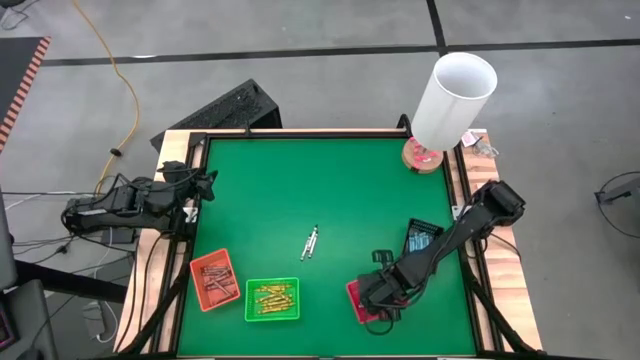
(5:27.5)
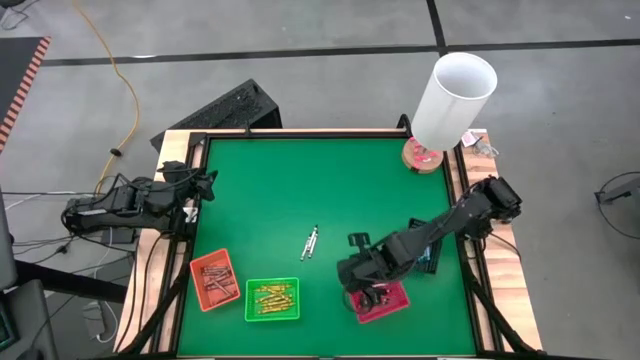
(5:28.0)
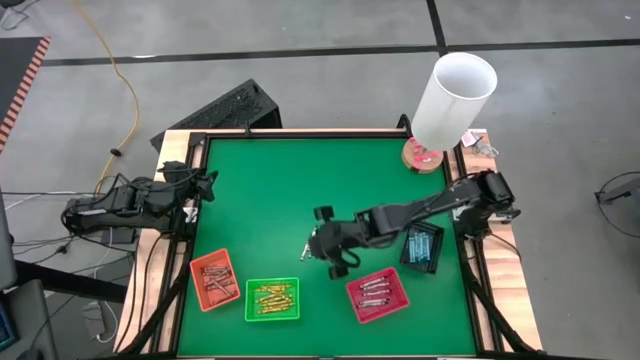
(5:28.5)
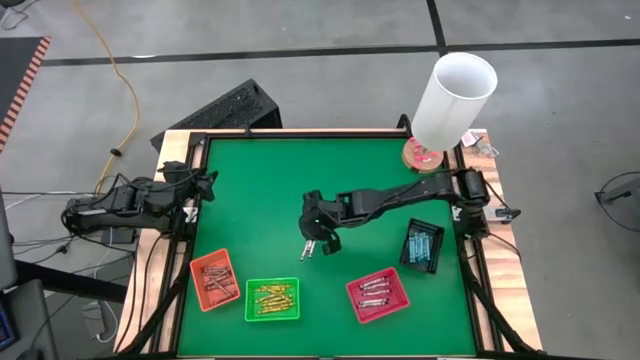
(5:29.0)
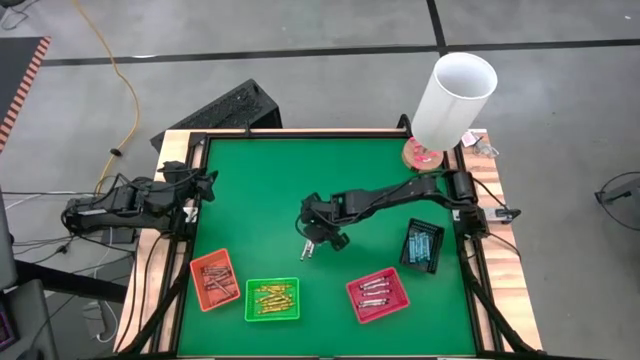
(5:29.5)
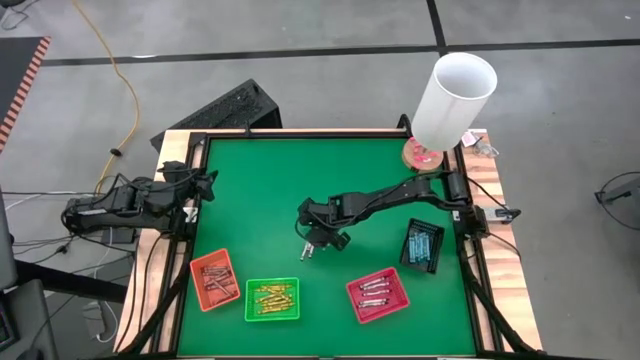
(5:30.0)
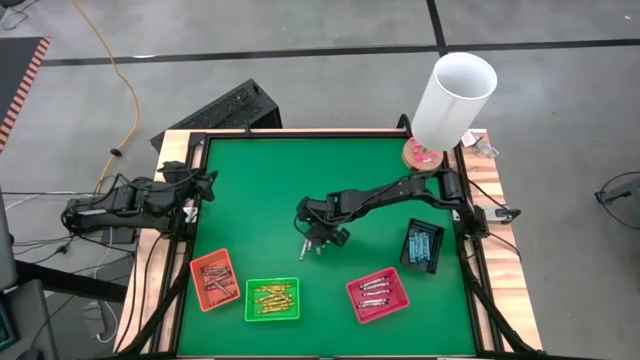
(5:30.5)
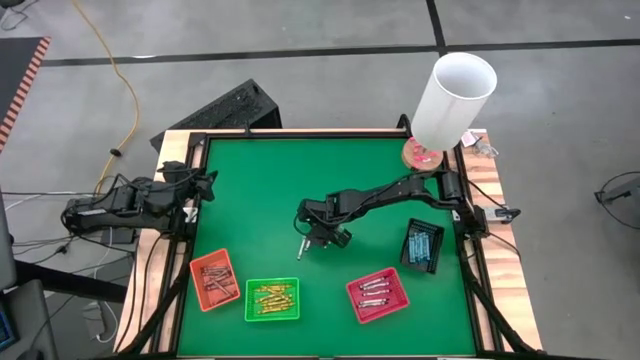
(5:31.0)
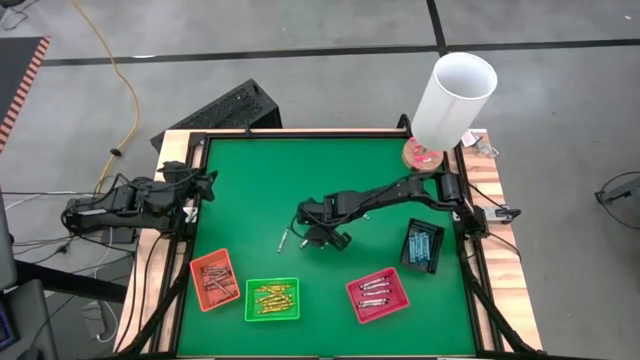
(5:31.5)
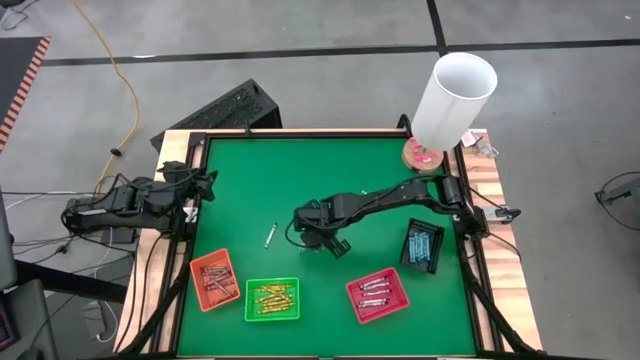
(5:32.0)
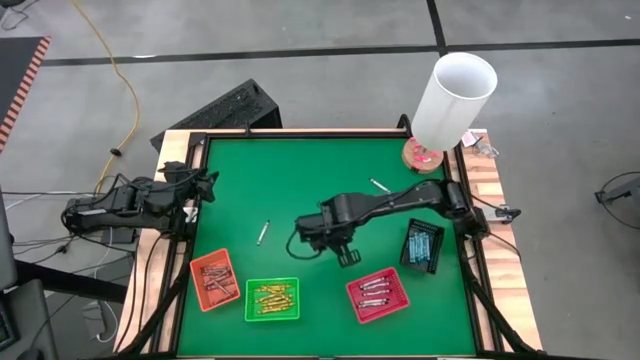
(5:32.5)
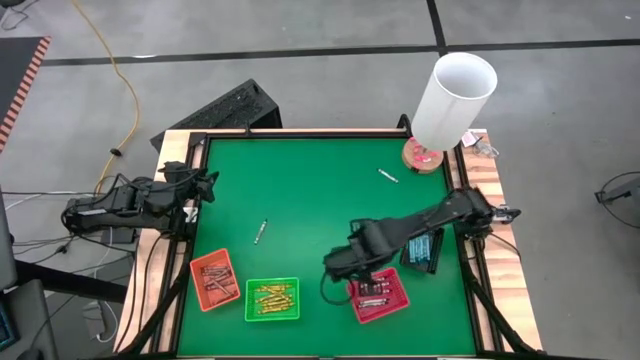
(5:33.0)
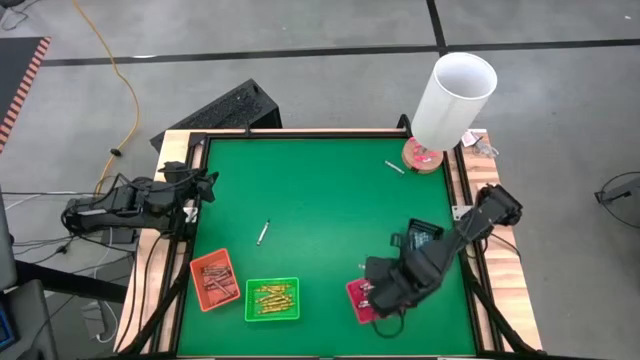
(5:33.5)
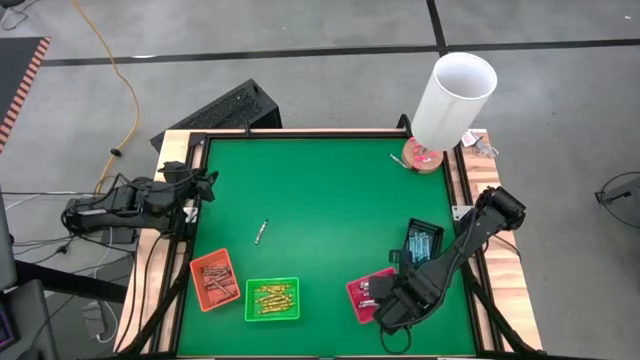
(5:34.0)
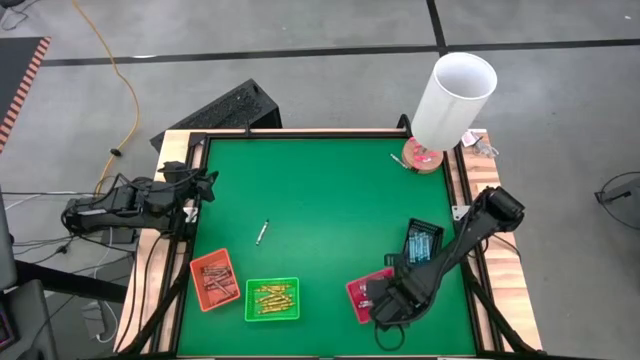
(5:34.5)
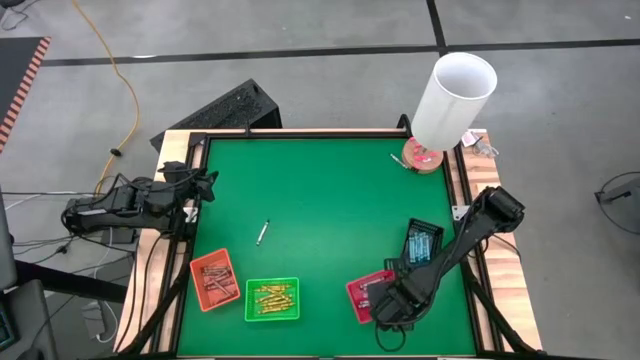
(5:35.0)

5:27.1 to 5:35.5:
Task: Sort crayons
Put the black crayon into the red bin

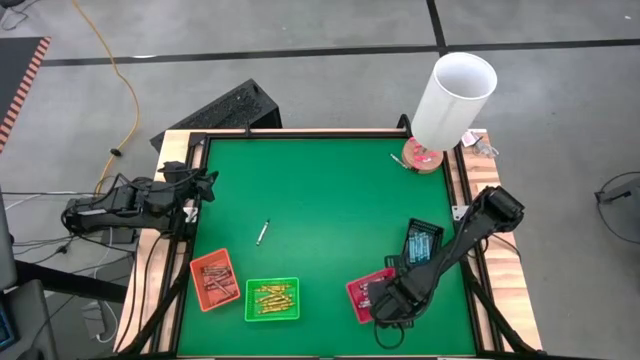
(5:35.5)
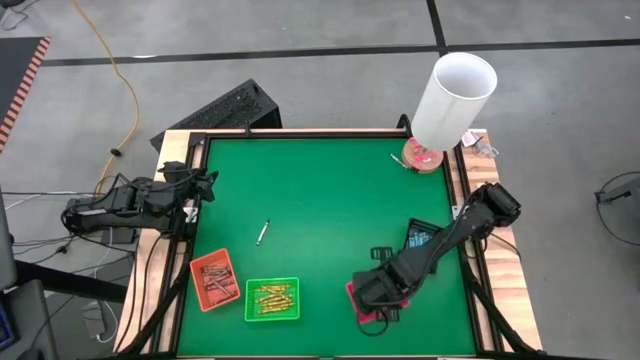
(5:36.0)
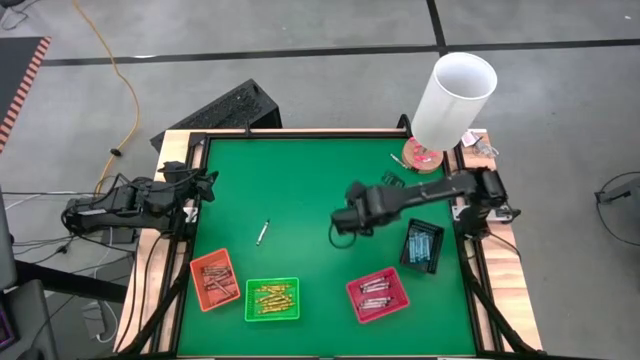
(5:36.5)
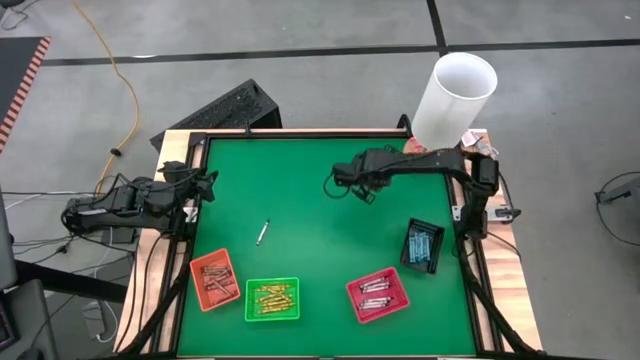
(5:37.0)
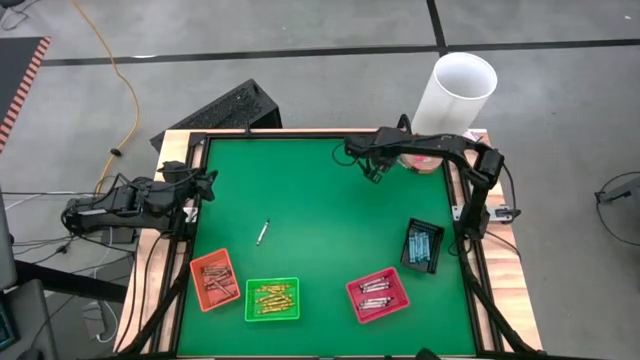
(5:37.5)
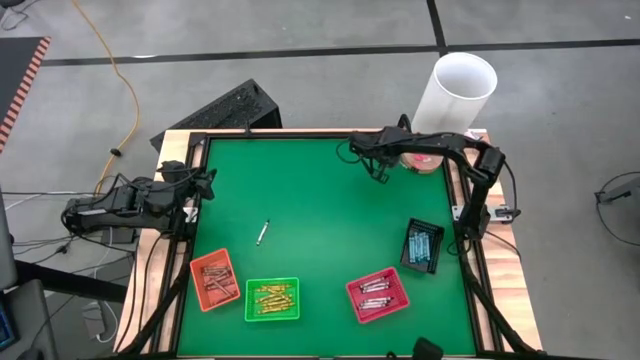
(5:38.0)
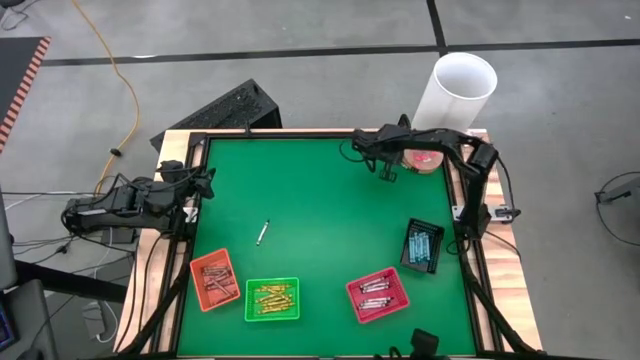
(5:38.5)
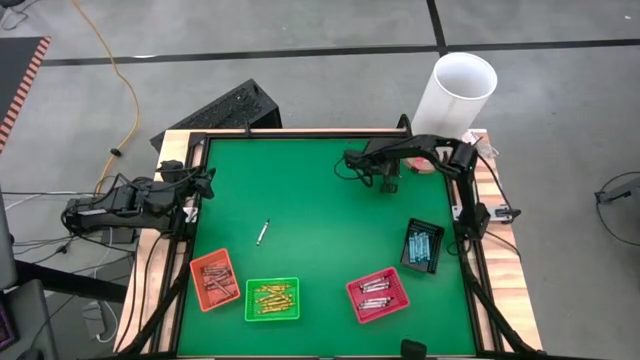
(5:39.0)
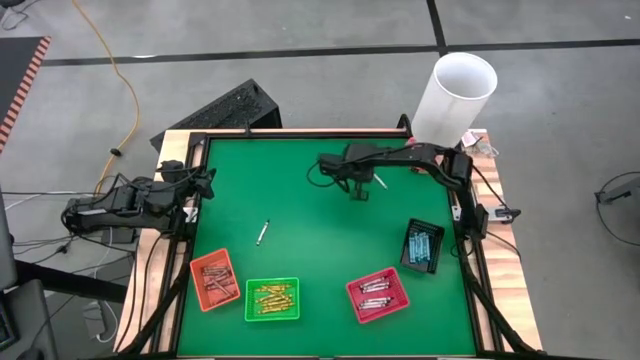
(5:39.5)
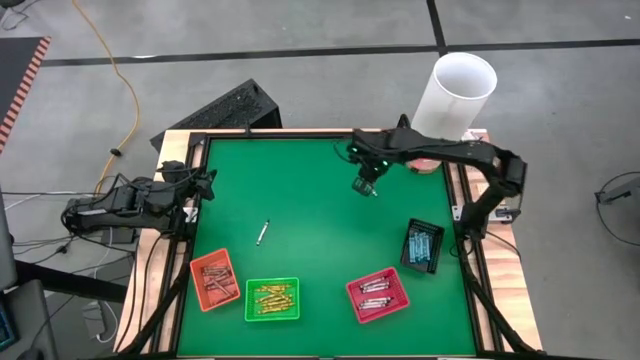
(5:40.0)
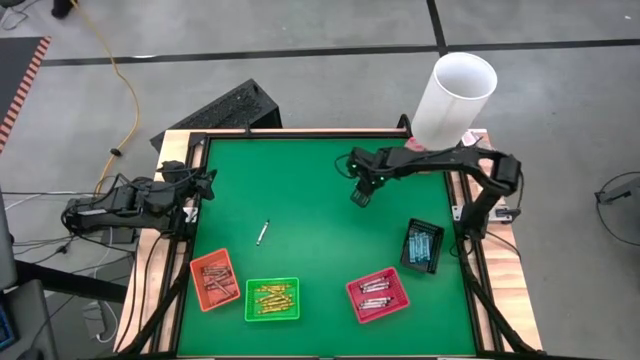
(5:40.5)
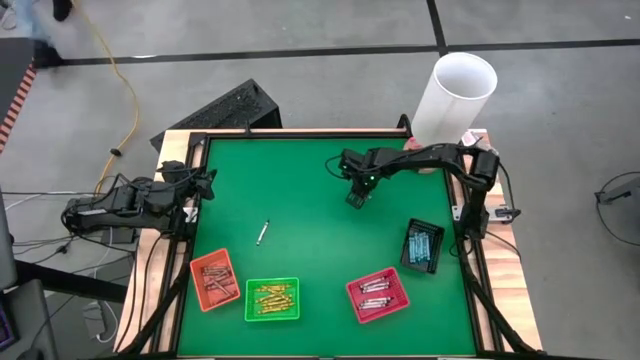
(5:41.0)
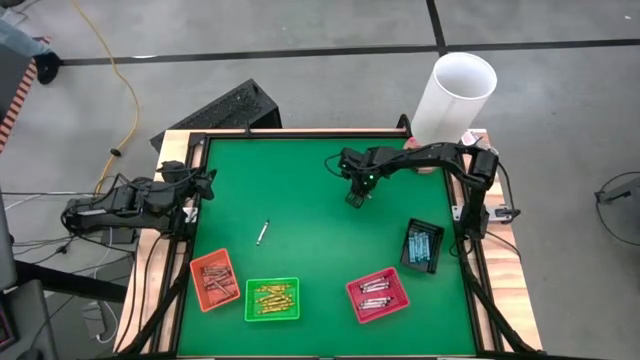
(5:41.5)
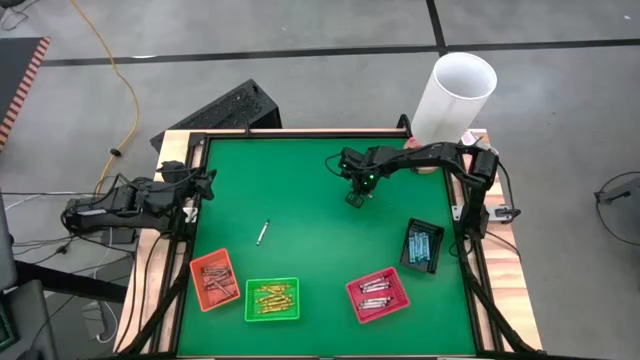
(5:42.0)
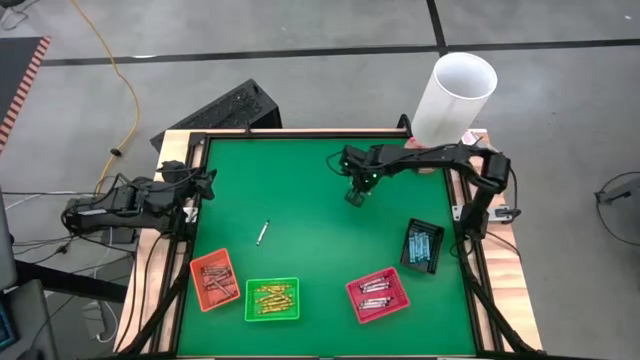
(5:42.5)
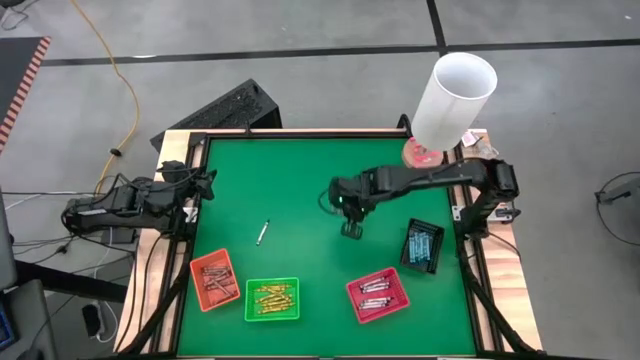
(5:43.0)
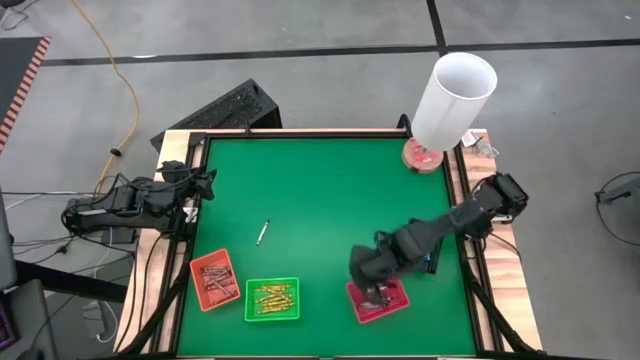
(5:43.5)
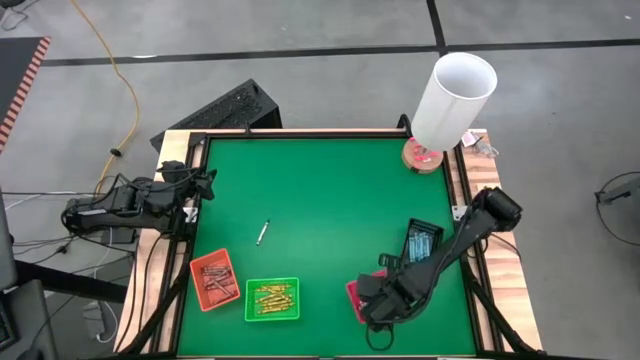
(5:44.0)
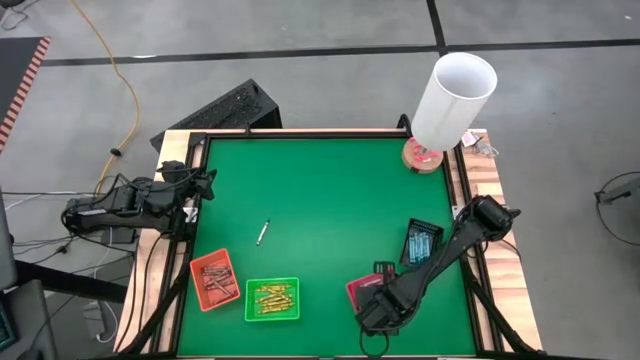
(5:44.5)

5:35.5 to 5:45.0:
Put the black crayon into the red bin

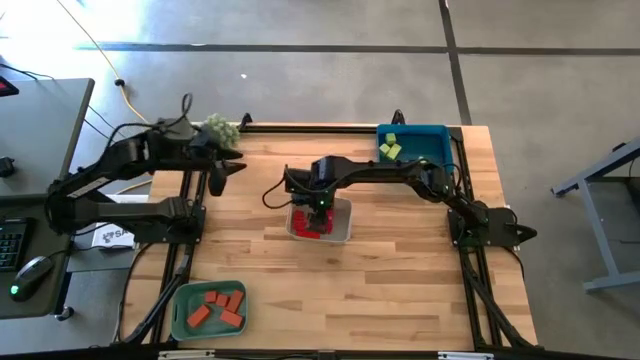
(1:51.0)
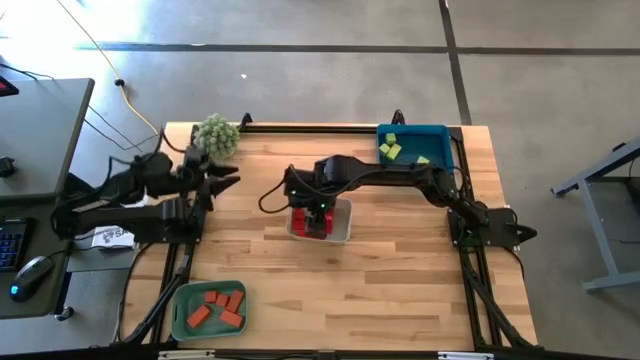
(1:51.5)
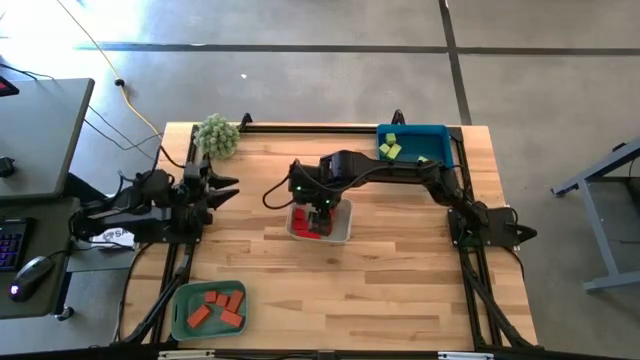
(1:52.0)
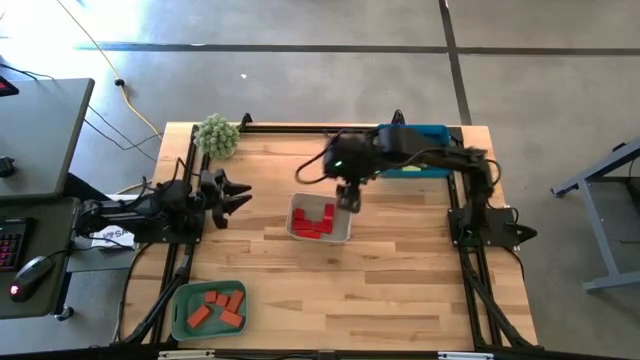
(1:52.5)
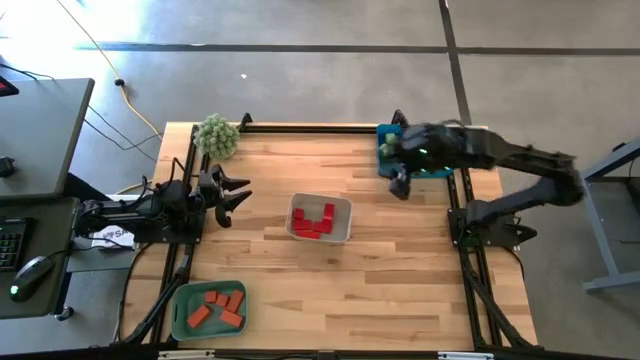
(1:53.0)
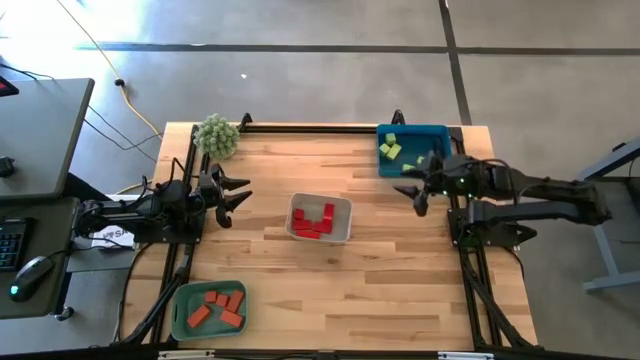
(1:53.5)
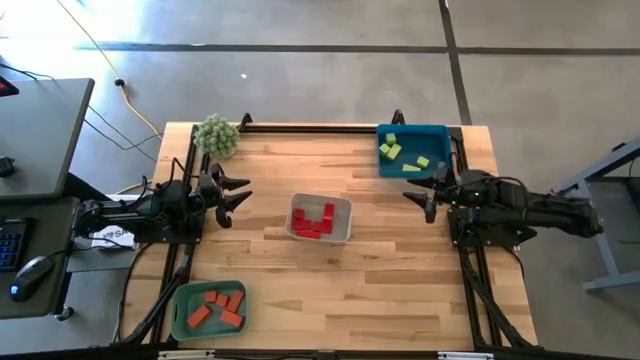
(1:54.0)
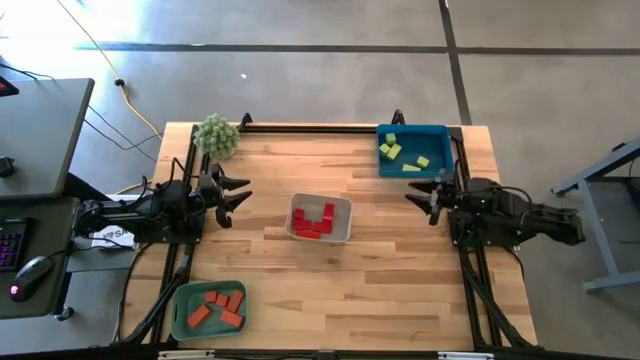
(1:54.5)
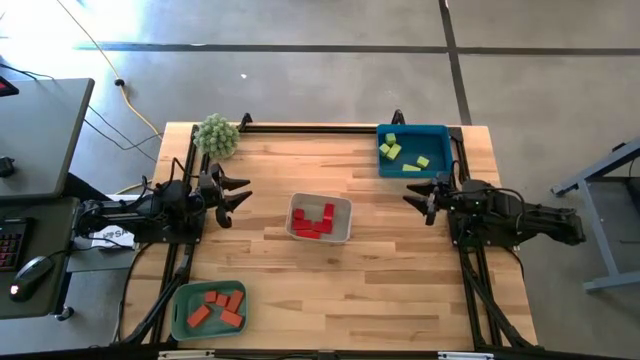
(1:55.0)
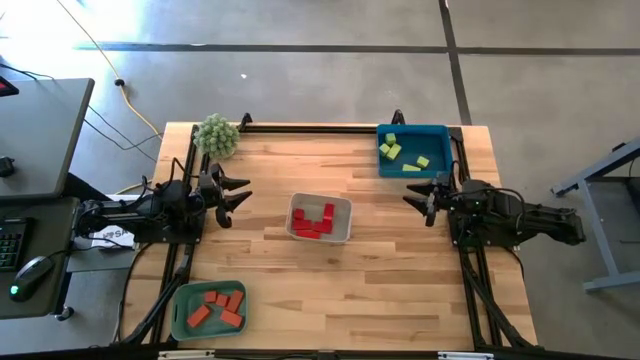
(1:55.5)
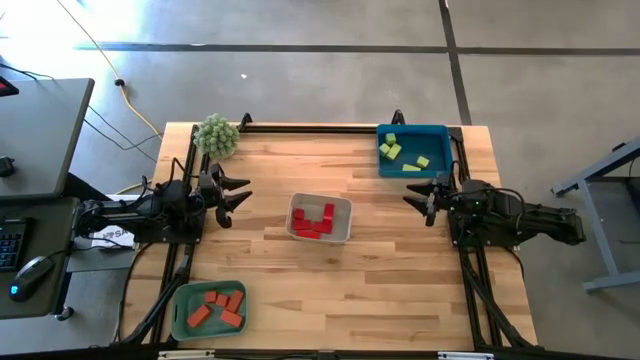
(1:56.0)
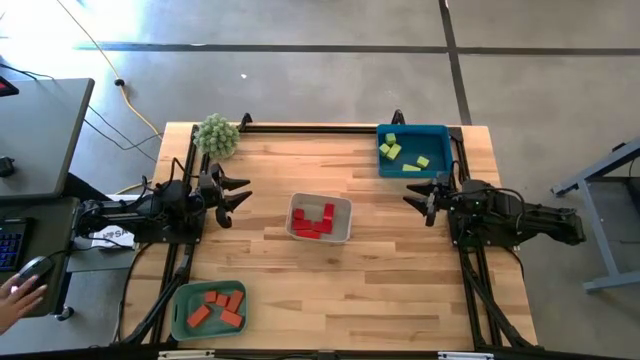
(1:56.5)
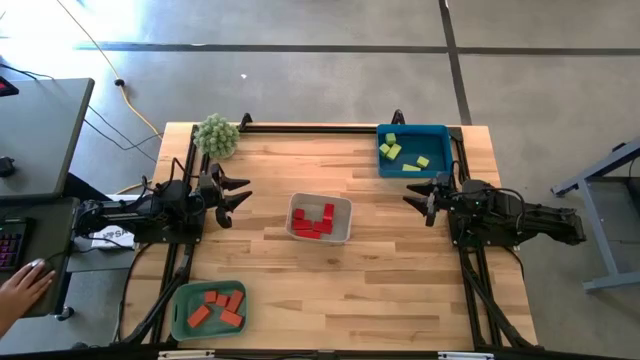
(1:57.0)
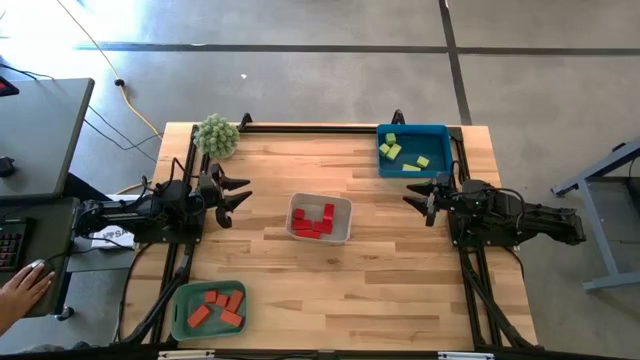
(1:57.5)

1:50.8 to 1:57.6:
Task: Sort & place blocks by color
Return to Home Position
